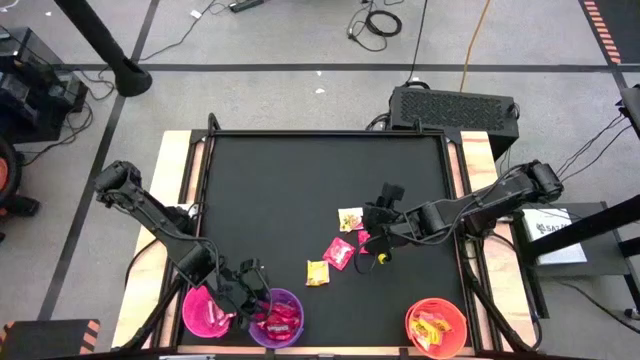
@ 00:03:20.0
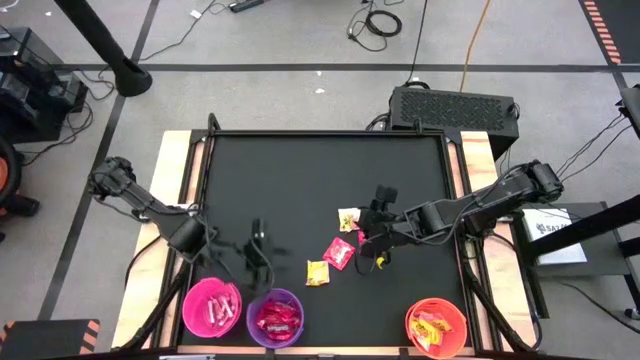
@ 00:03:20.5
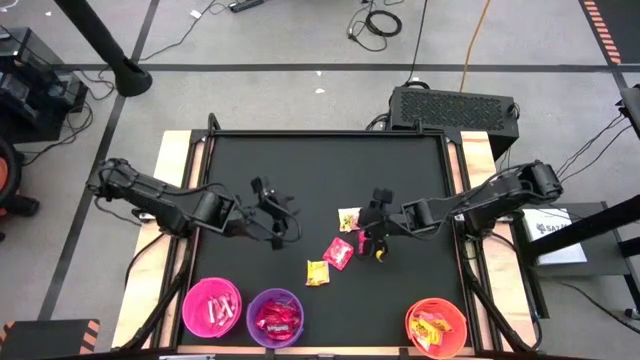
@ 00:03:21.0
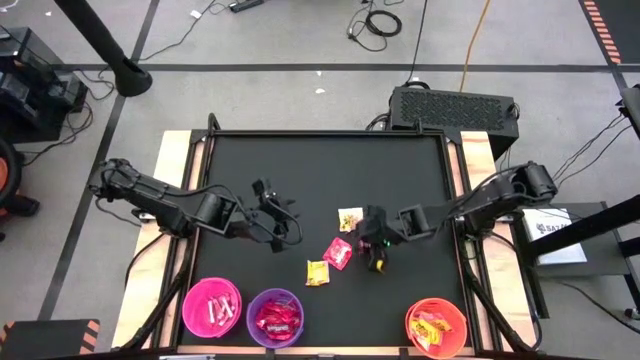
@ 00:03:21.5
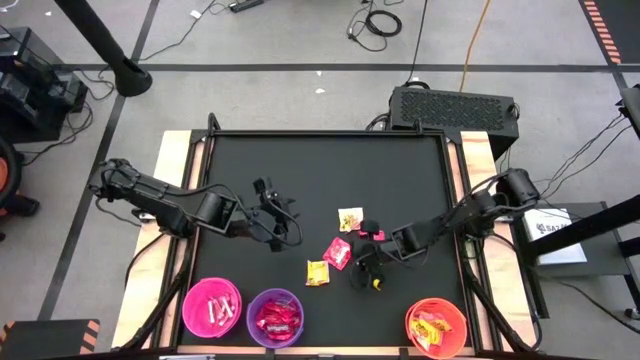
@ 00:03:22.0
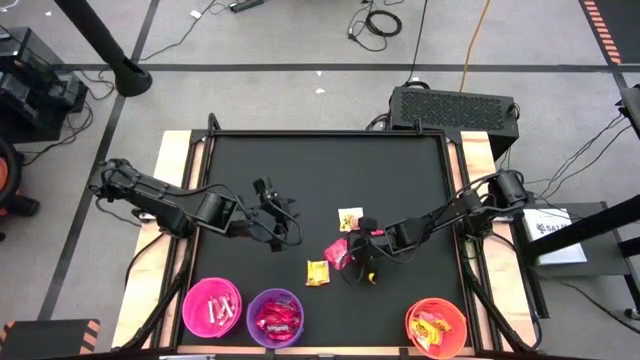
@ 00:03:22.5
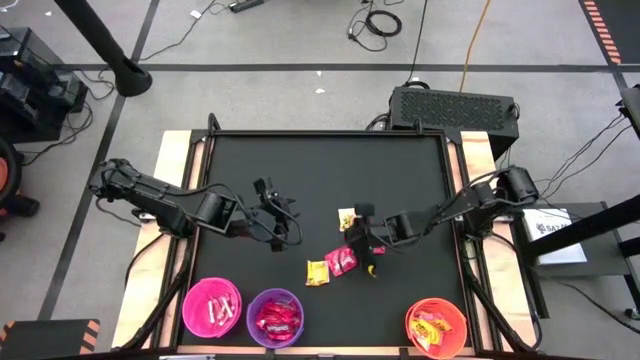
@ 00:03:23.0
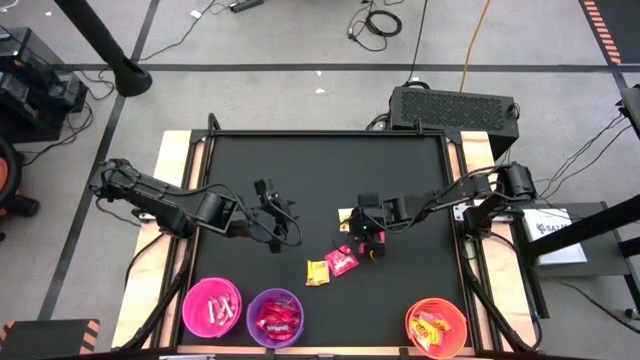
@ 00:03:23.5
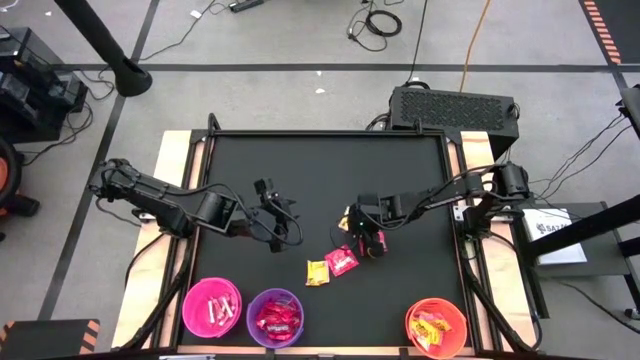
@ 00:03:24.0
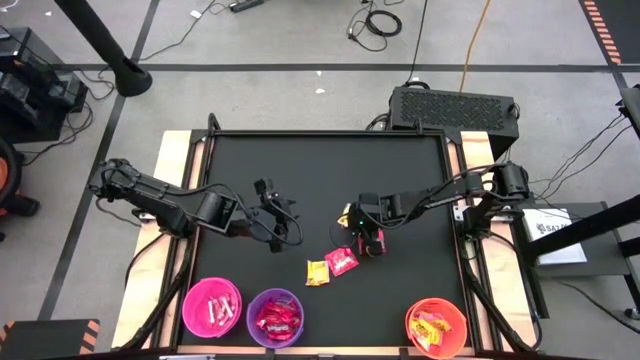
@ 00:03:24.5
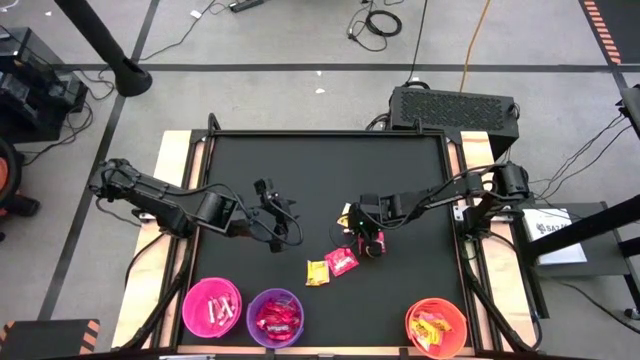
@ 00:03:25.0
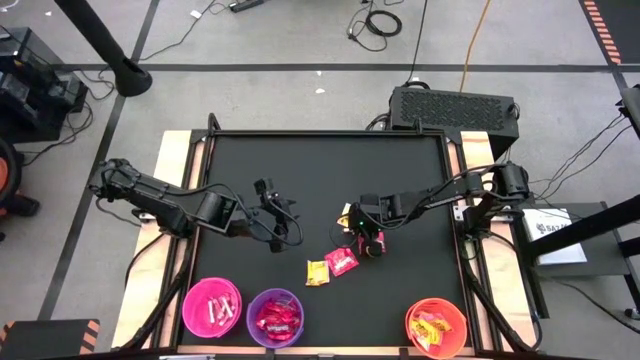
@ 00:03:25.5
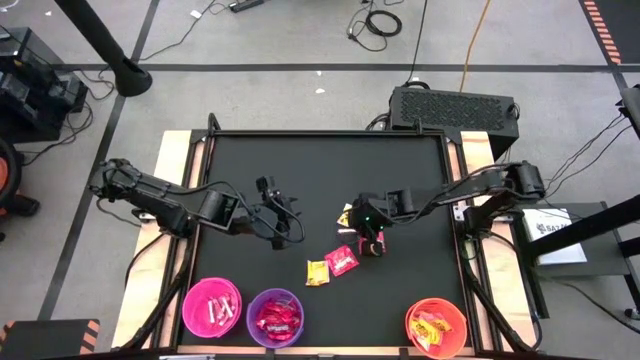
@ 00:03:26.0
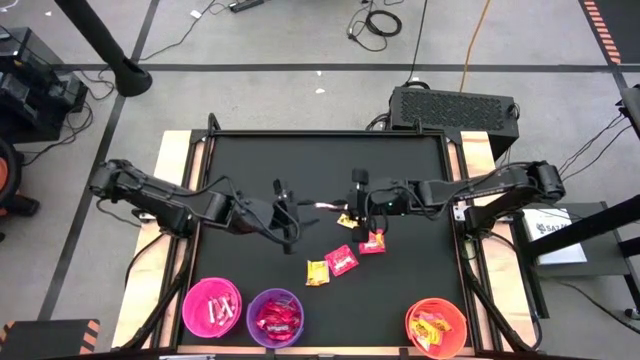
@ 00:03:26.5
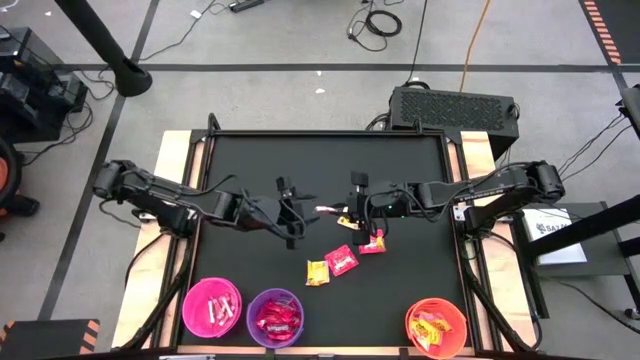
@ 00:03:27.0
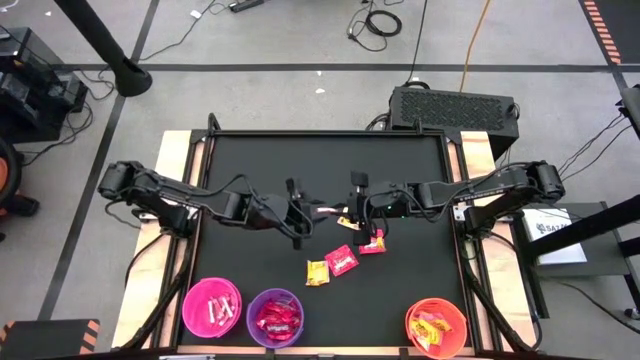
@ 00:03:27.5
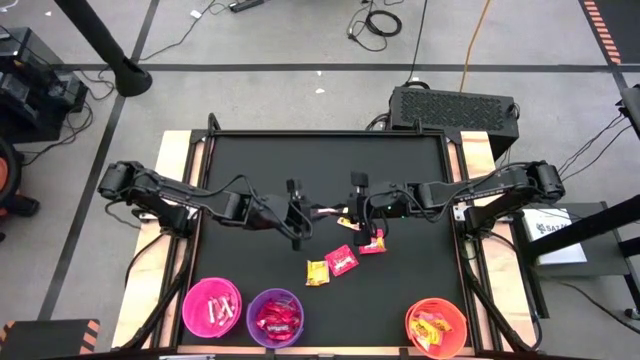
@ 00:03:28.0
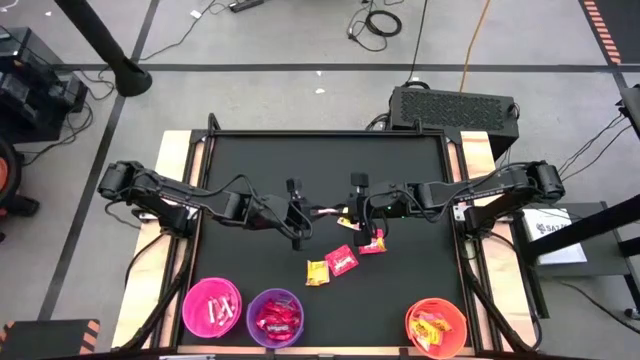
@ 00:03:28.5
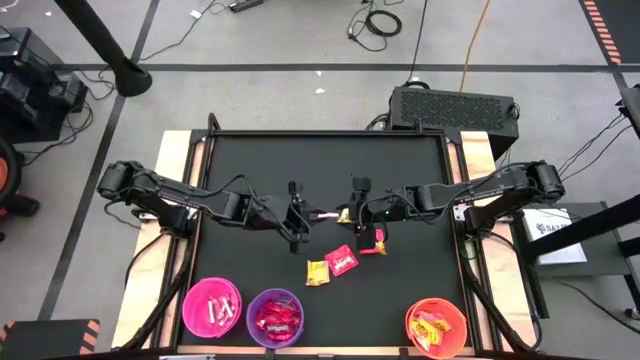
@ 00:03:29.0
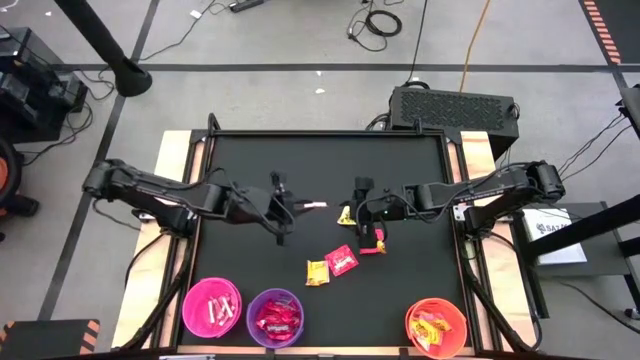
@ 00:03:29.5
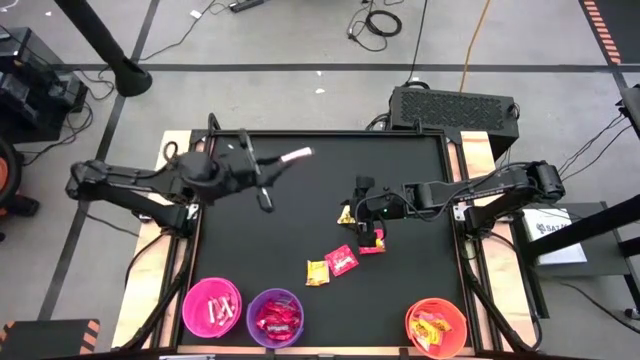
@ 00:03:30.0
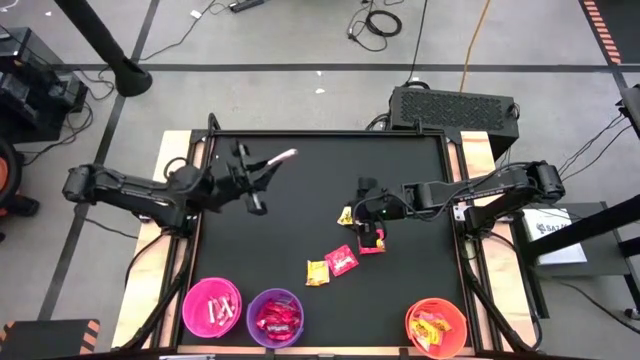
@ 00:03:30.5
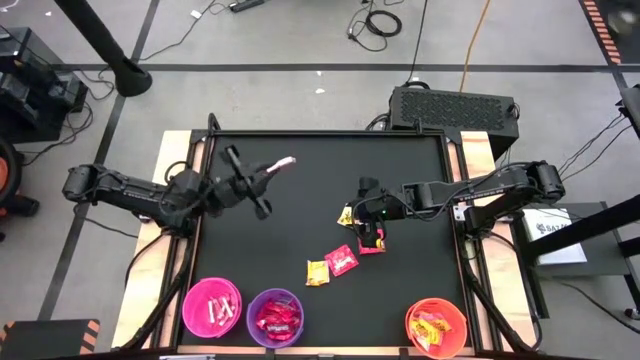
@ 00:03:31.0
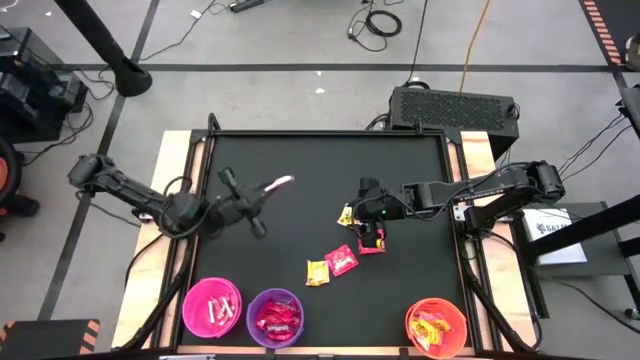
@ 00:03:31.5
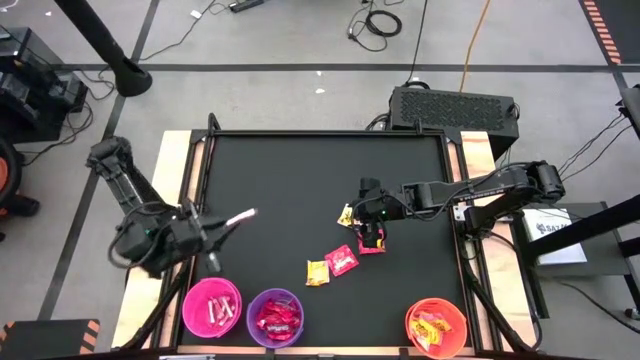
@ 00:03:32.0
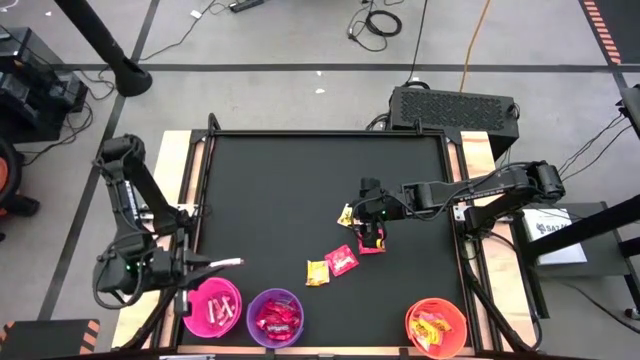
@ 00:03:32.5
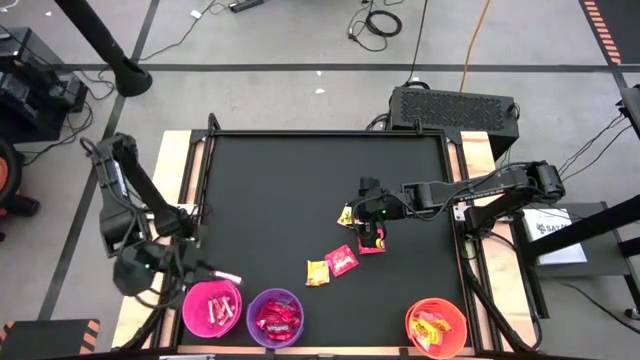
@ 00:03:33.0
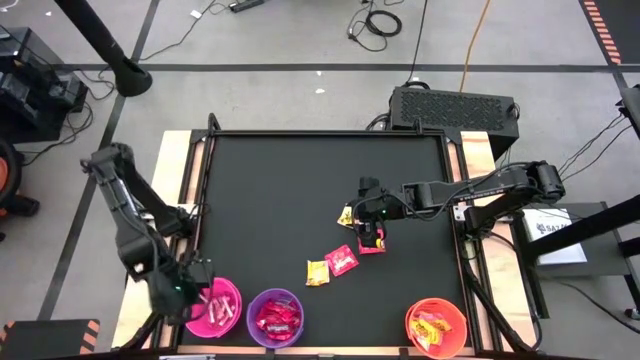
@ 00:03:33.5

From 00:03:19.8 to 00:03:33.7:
Task: Sort candy by brand, put in halloween buckets
Put the orange candy into the pink bucket

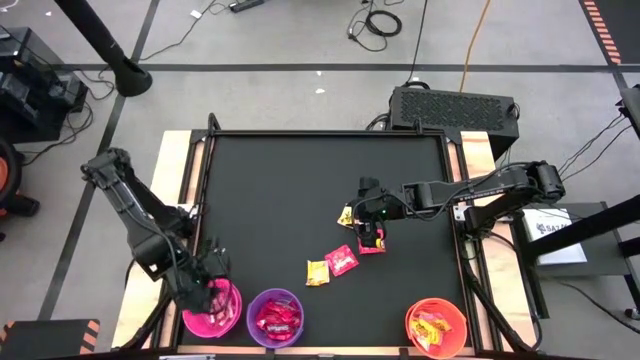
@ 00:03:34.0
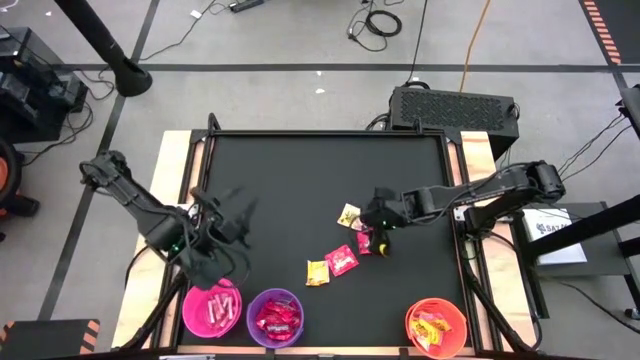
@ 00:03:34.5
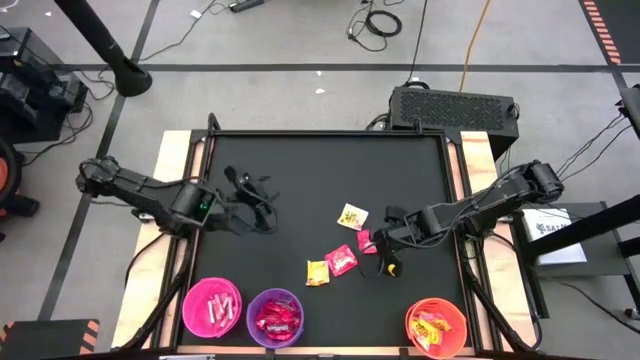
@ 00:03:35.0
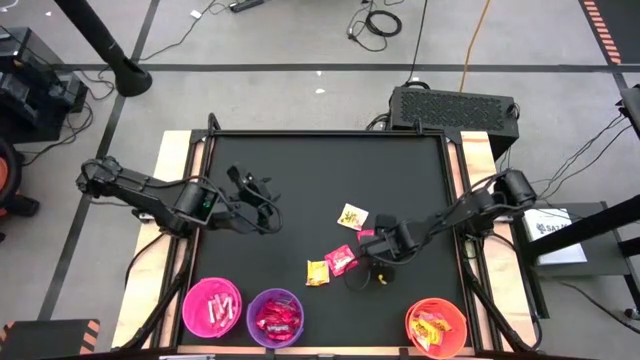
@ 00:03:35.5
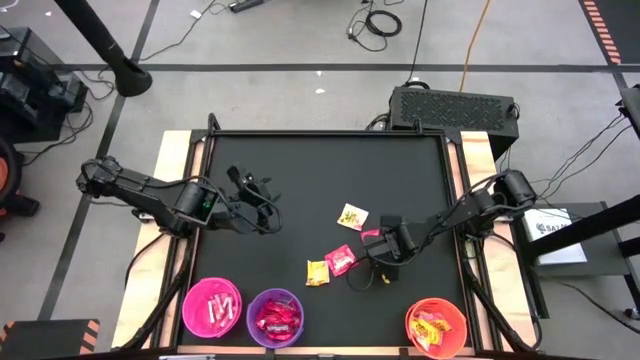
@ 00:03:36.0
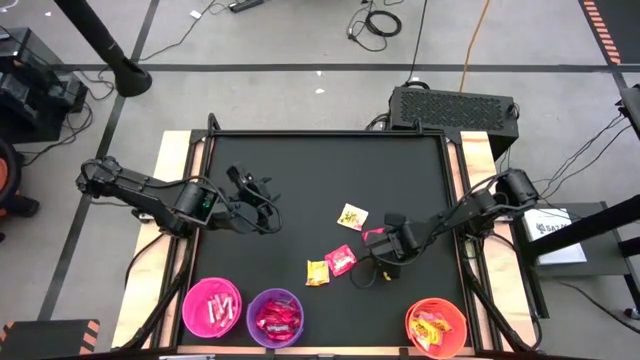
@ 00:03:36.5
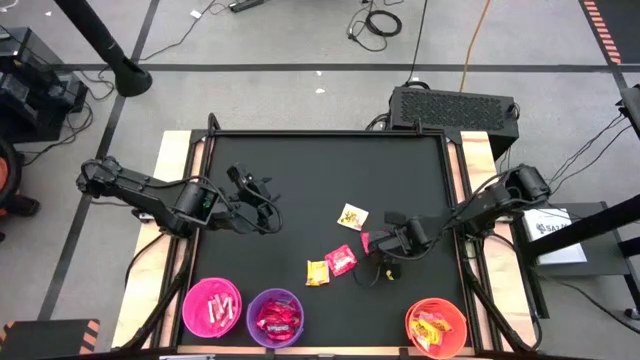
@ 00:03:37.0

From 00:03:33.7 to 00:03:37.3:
Put the red candy into the violet bucket

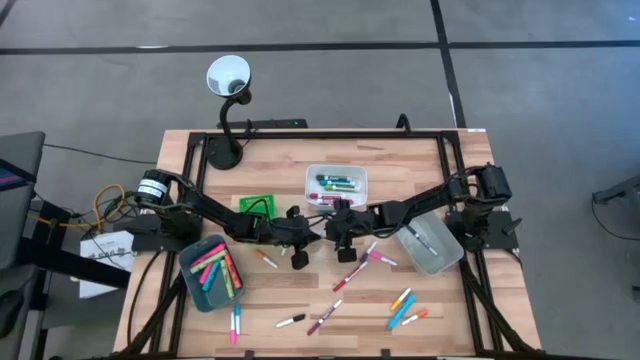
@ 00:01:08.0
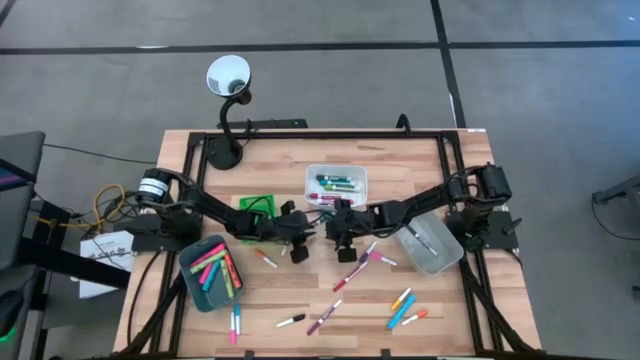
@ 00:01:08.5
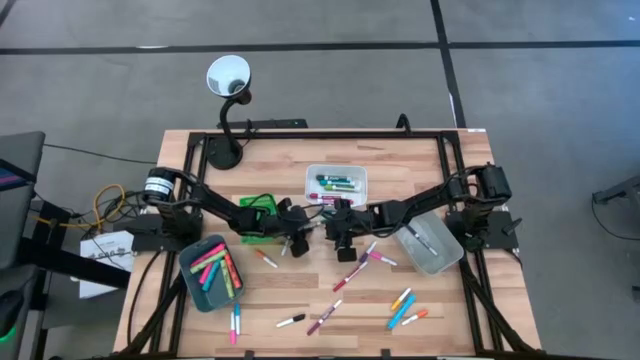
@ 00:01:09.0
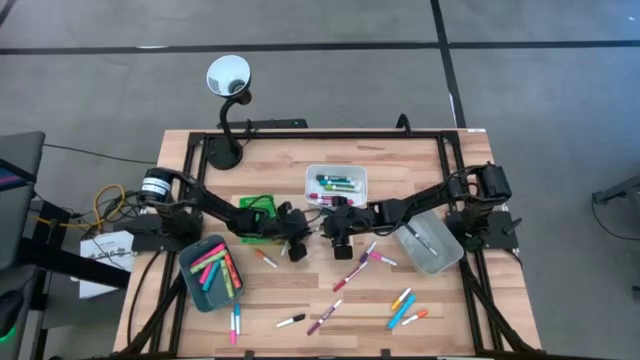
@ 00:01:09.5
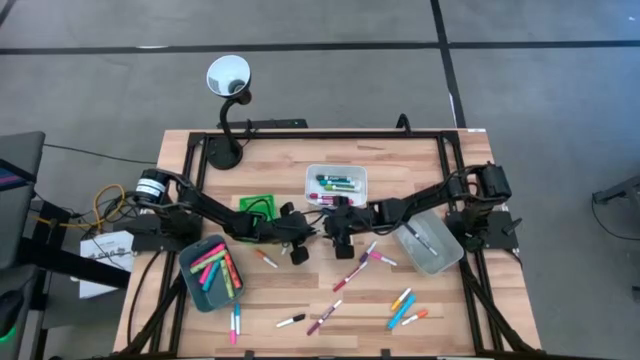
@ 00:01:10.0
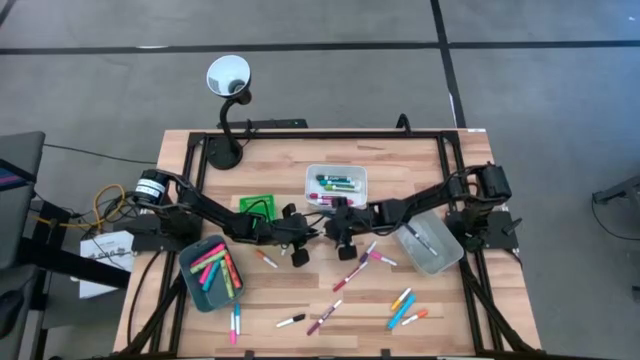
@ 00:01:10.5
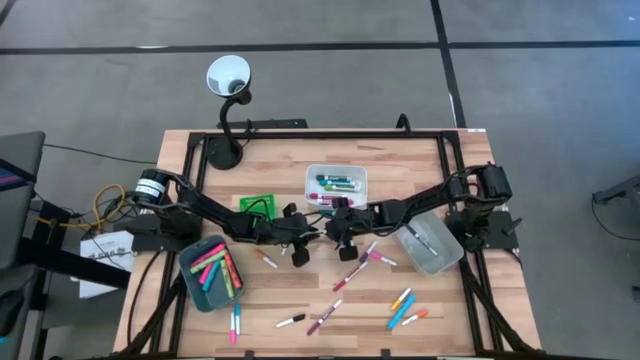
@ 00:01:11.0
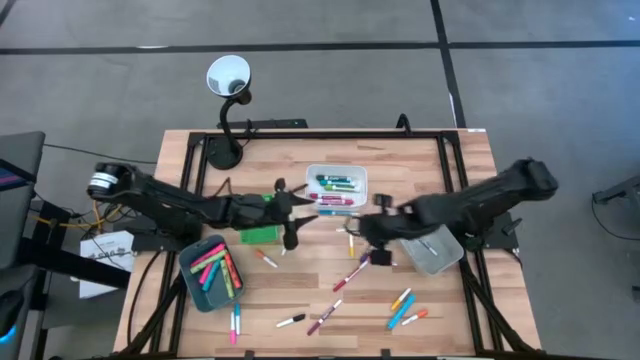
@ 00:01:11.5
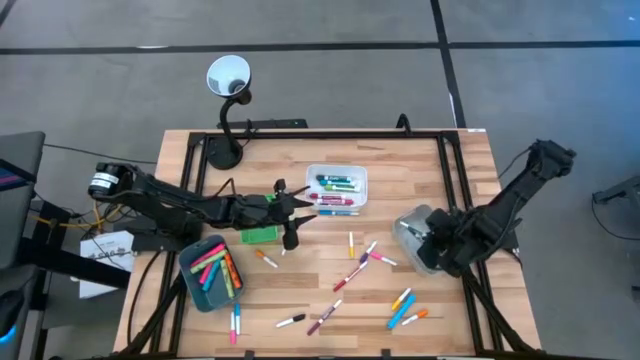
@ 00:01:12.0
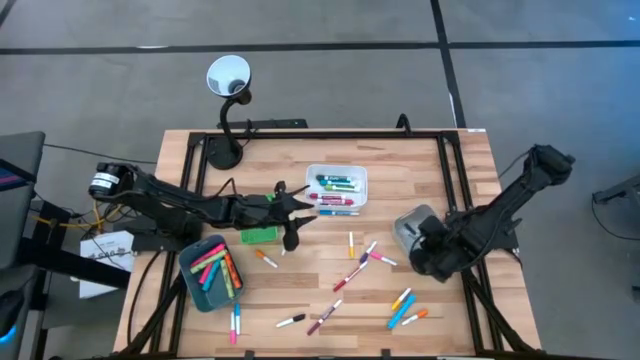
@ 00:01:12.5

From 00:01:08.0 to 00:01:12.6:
Task: Pick & Place Markers
Put the small green marker pen into the gray bin
